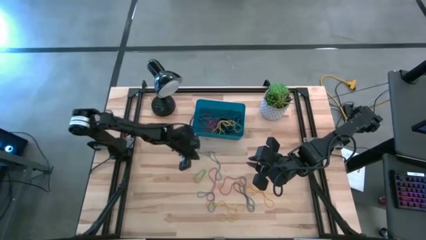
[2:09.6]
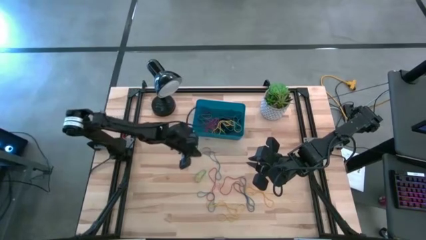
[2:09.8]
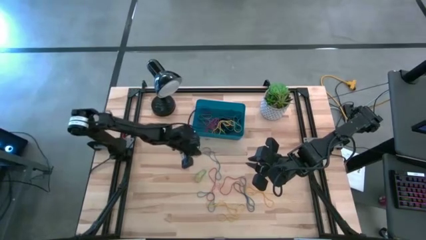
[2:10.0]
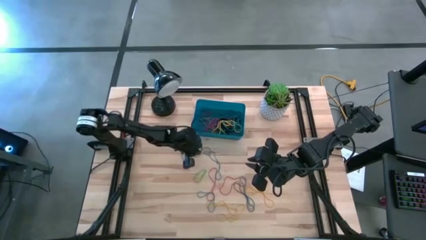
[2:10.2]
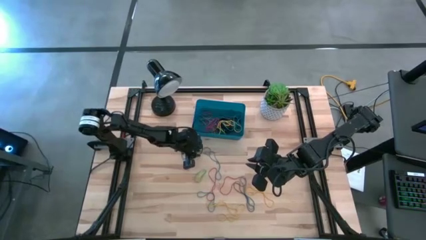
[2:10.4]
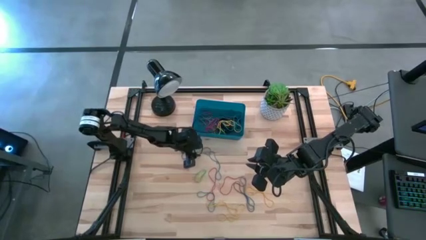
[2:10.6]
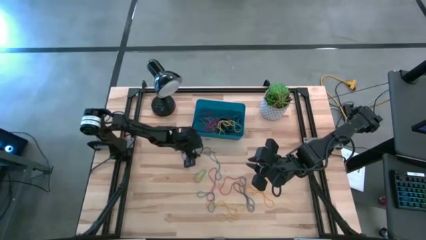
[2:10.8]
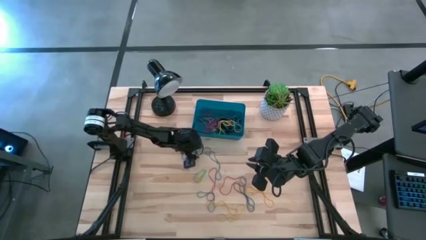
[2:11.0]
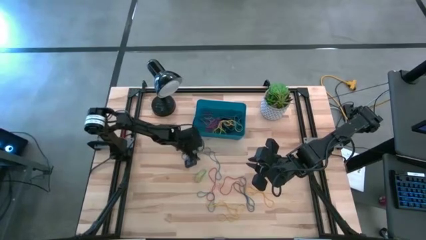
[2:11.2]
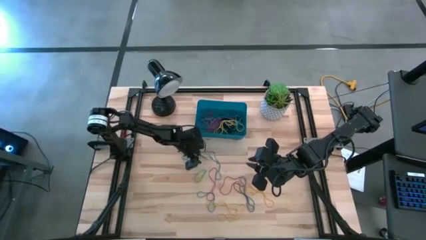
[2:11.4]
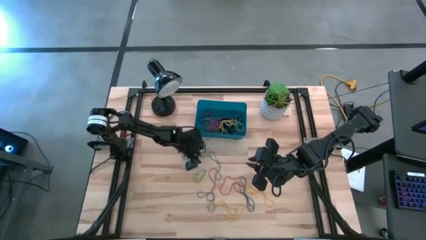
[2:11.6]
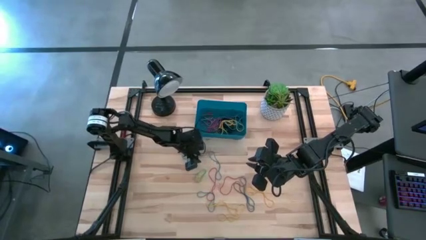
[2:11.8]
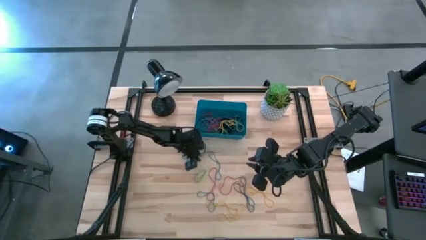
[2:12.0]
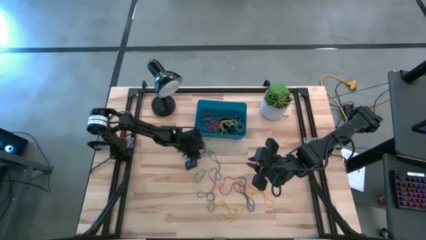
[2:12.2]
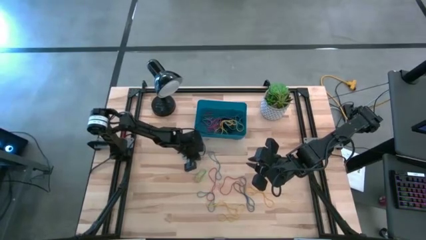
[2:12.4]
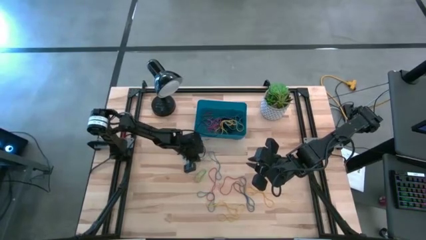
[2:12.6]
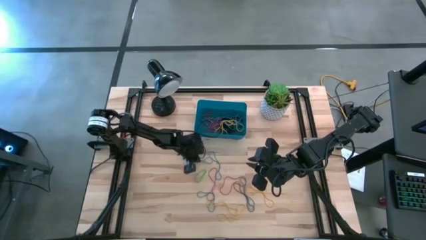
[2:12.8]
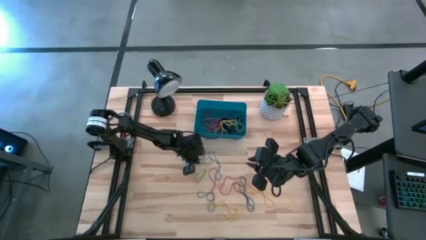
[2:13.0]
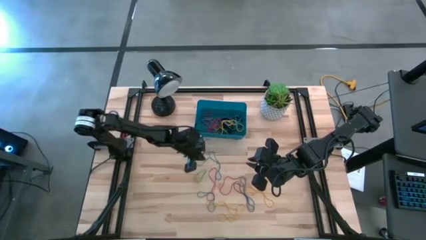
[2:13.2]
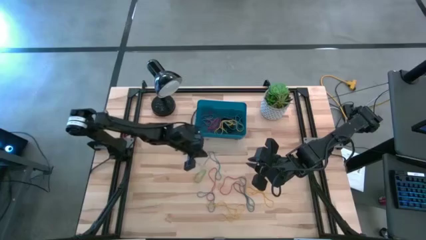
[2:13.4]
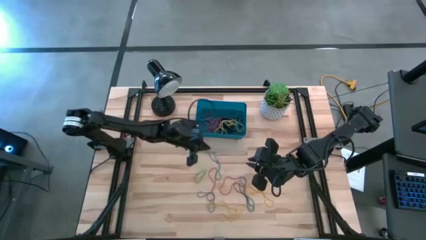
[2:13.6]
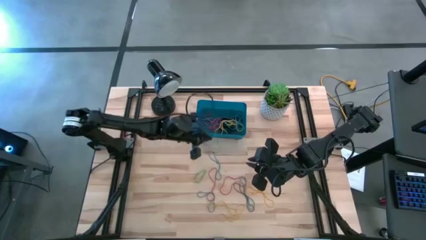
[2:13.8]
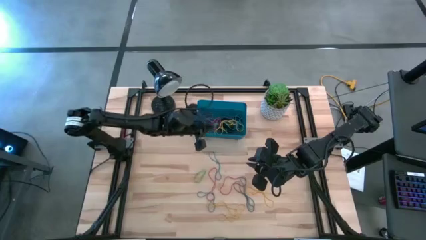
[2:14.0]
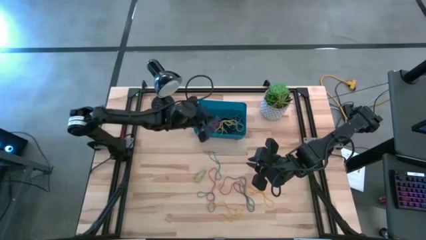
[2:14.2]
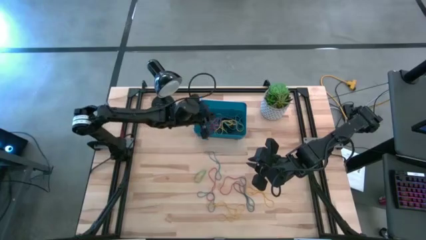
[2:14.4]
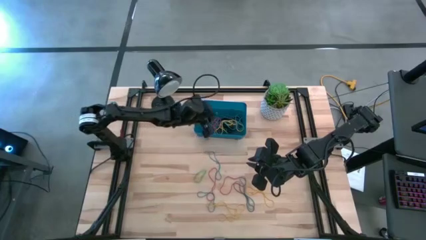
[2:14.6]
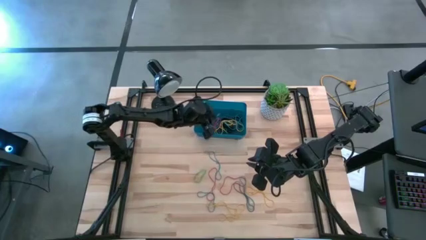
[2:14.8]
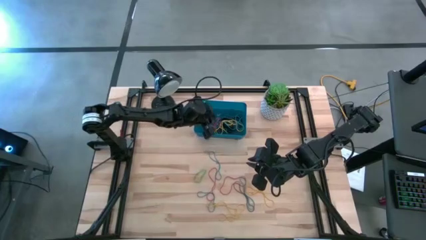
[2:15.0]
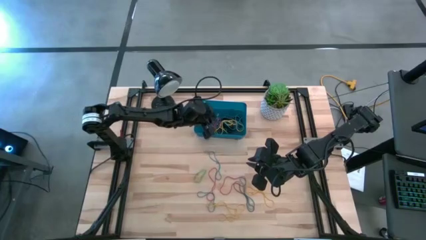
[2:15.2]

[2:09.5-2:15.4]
Task: Pick and place rubber bands into bin
Put the blue rubber band into the blue bin

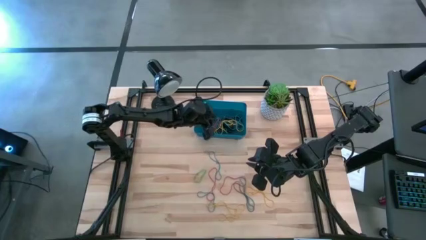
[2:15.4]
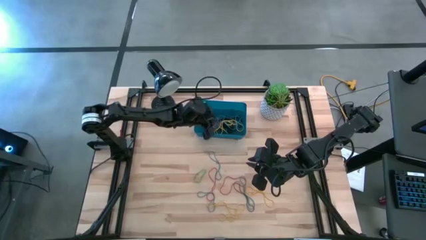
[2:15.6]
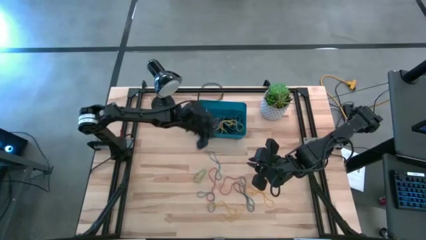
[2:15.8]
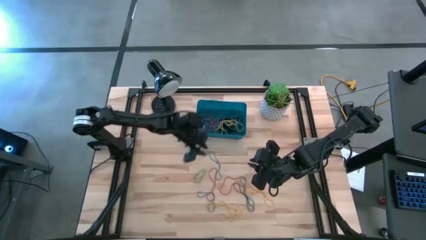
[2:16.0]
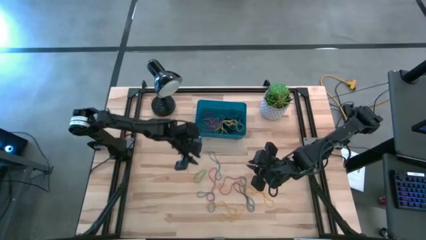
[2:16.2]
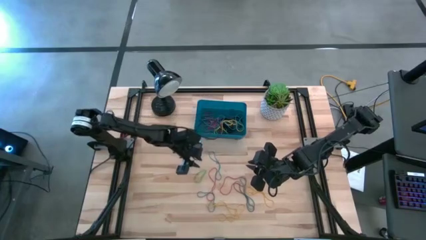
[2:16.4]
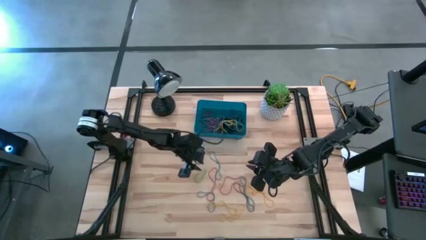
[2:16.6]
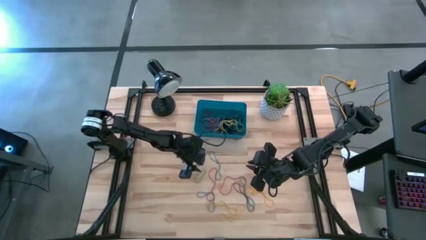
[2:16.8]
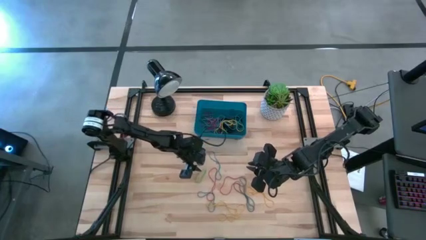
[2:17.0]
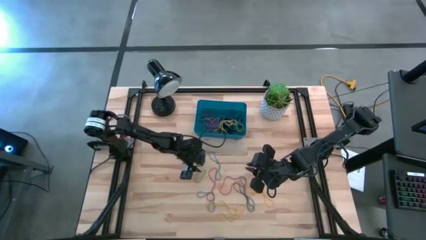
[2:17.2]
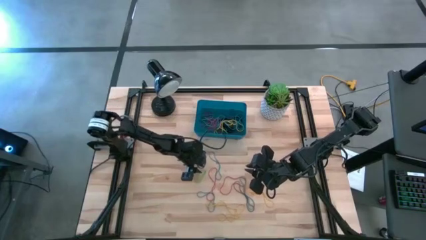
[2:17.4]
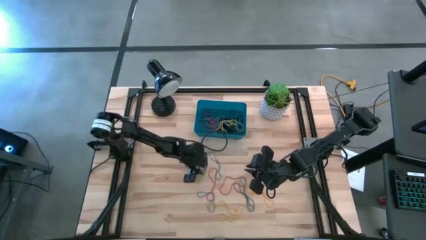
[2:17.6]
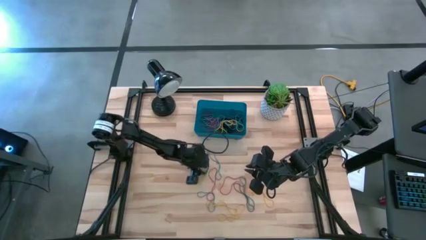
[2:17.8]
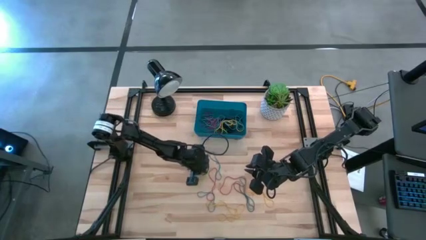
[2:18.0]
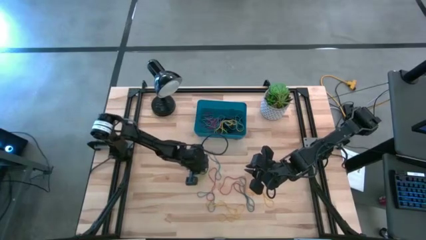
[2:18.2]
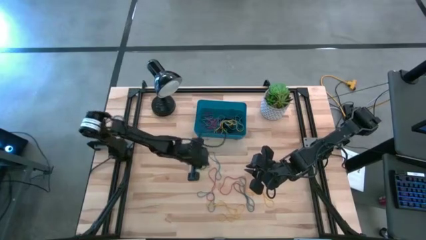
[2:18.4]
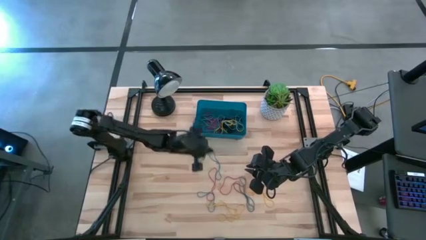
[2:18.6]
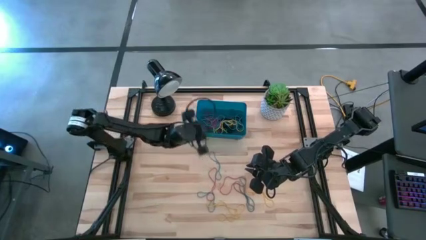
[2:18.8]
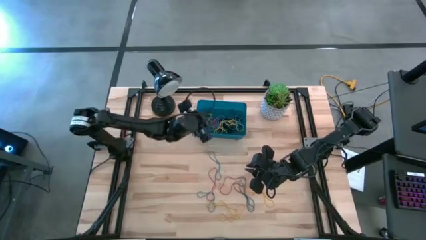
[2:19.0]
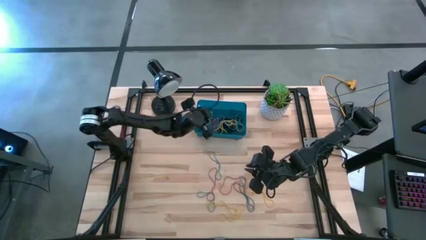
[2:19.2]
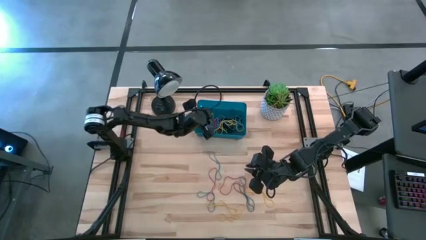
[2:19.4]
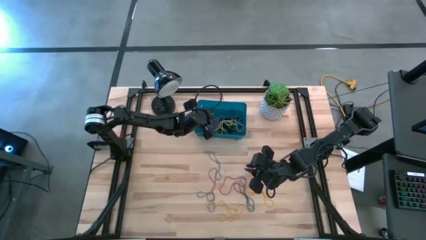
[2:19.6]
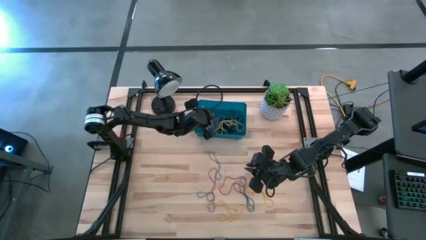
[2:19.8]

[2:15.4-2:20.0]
Put the green rubber band into the blue bin

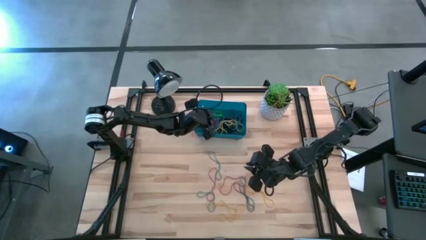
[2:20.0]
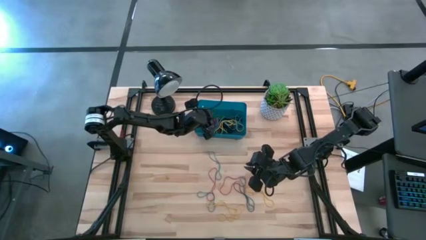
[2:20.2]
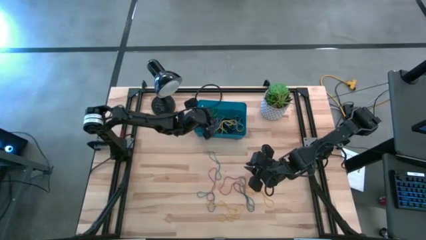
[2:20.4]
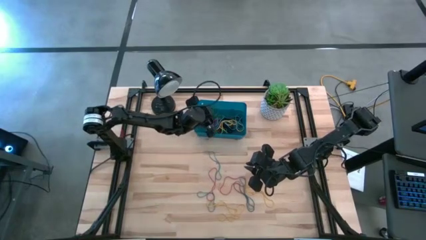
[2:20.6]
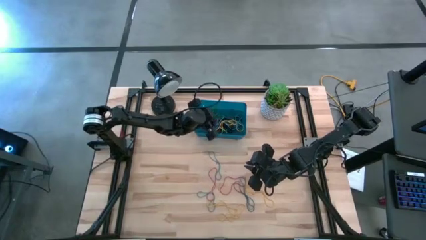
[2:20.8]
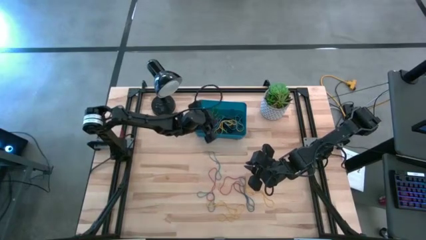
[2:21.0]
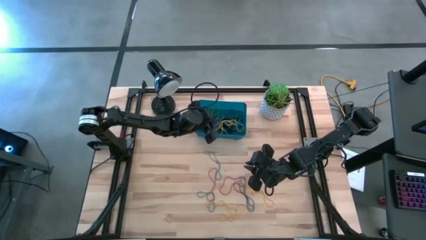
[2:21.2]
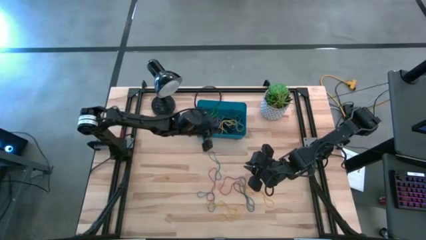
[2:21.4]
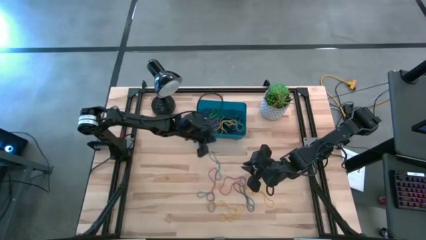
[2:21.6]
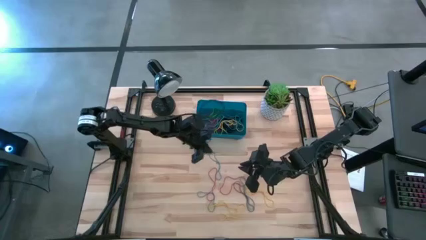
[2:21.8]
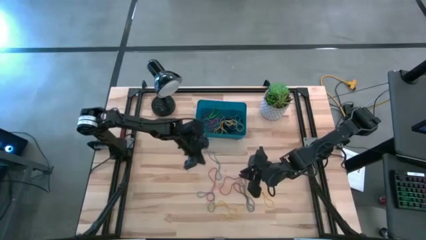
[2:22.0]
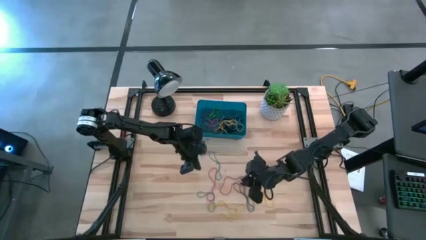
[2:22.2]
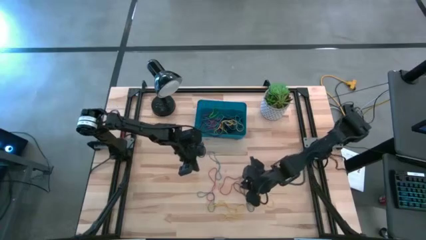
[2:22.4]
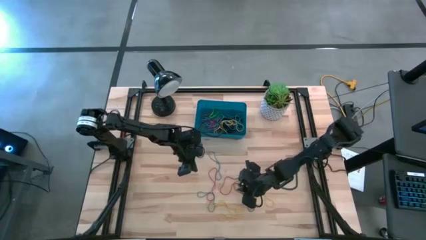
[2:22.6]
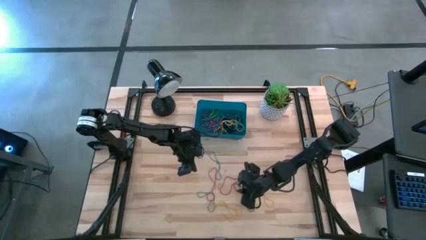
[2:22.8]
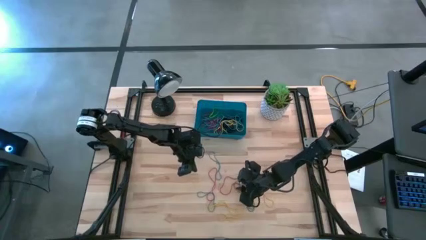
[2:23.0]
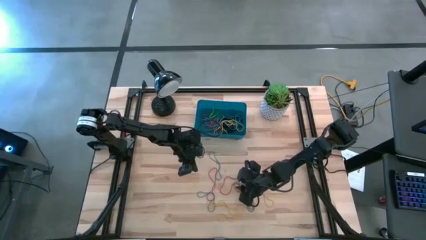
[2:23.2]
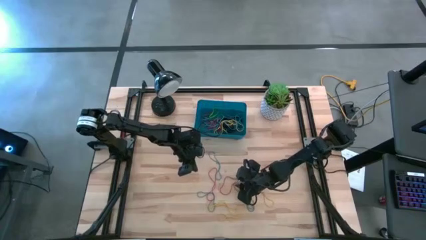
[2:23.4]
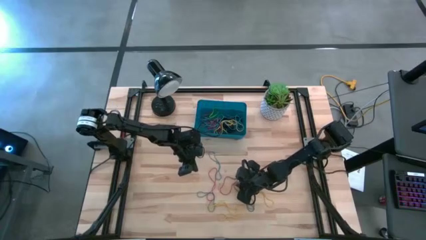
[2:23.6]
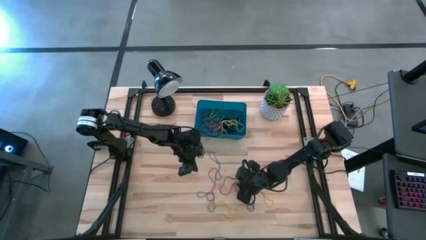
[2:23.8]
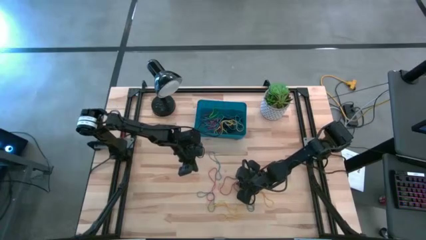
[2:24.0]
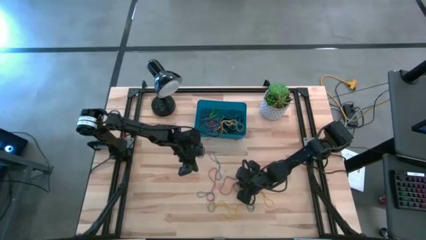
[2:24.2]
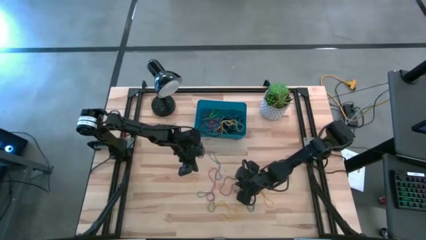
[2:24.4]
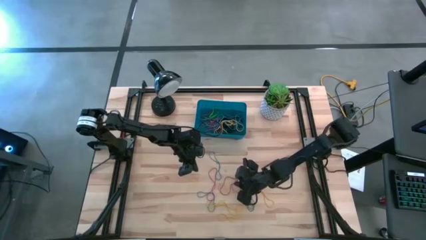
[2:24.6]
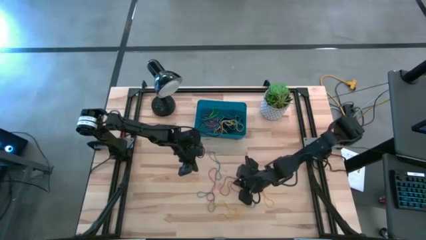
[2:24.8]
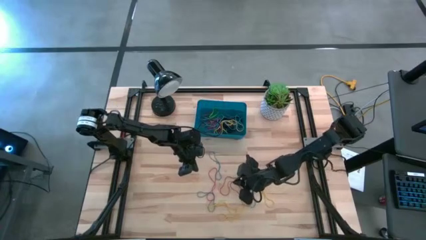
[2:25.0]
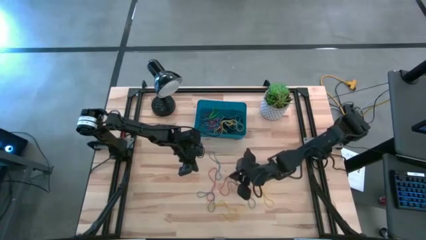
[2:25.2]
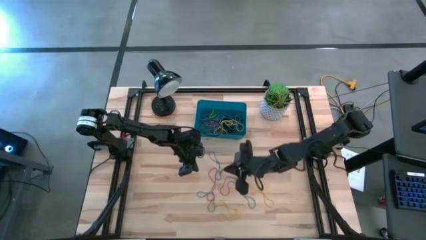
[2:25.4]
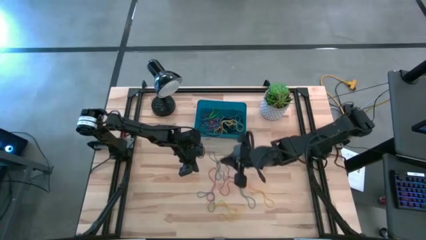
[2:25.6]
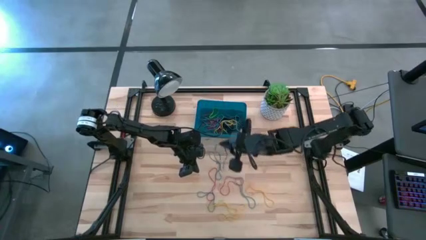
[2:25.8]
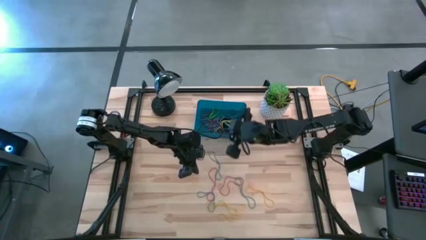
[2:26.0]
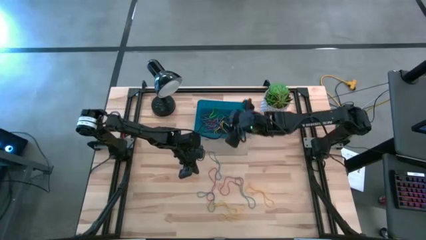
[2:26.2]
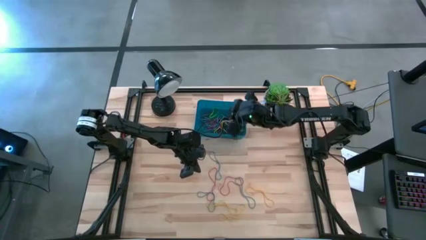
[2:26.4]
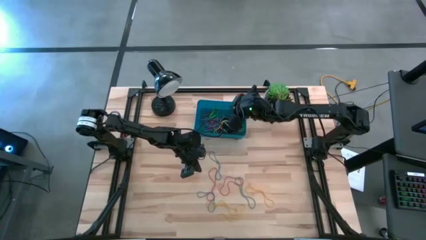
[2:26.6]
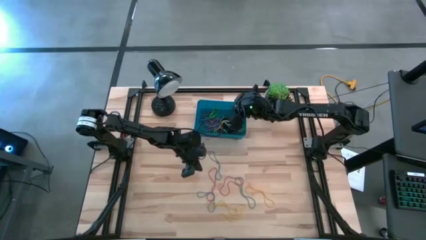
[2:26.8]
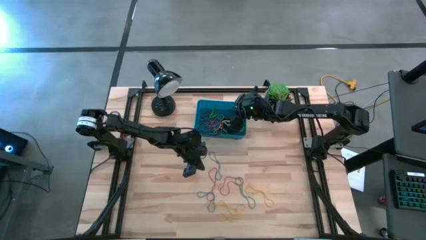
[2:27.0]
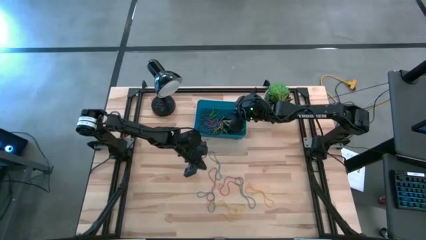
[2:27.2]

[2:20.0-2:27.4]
Put the purple rubber band into the blue bin
